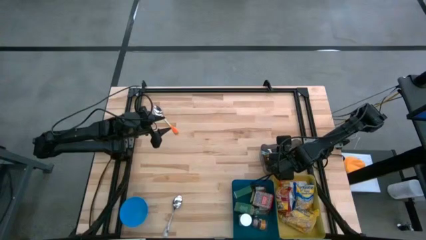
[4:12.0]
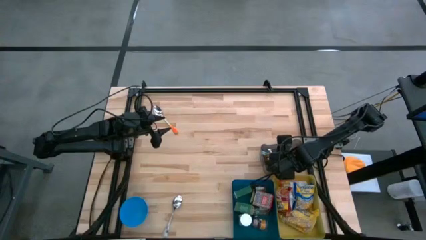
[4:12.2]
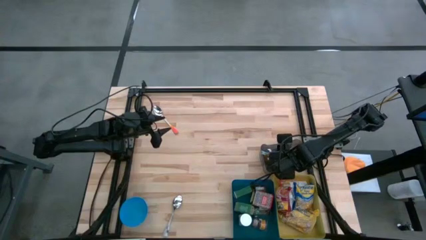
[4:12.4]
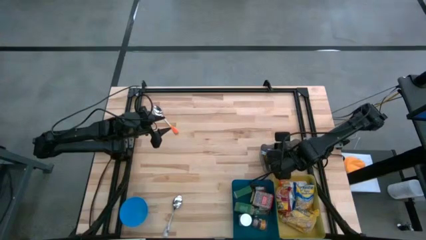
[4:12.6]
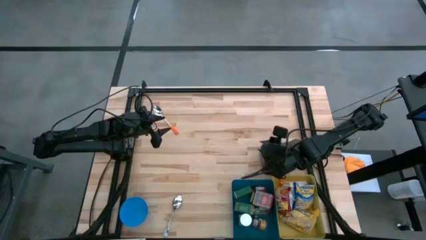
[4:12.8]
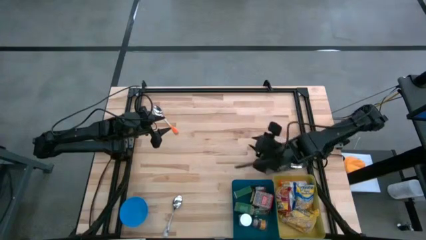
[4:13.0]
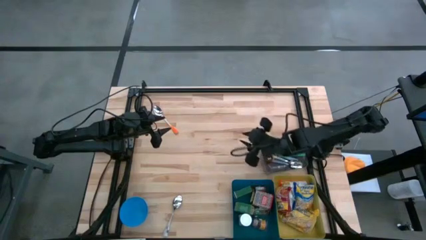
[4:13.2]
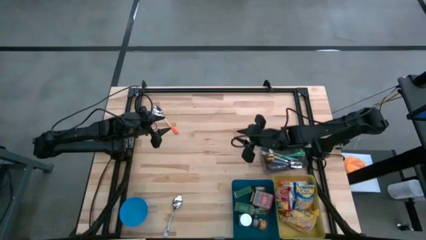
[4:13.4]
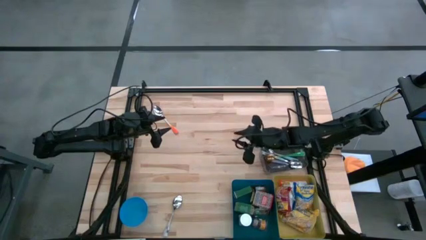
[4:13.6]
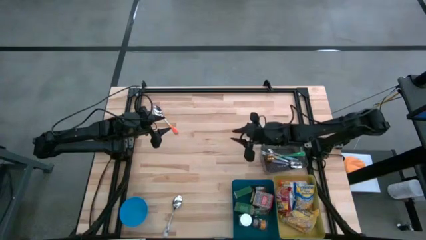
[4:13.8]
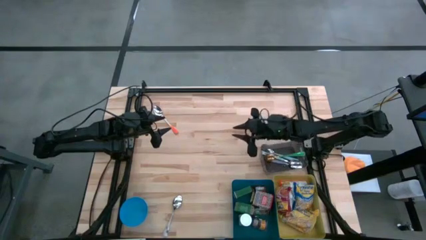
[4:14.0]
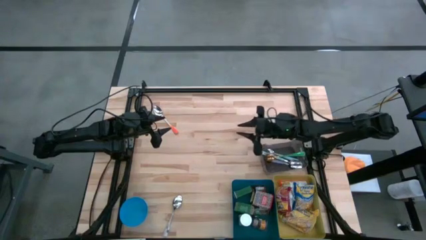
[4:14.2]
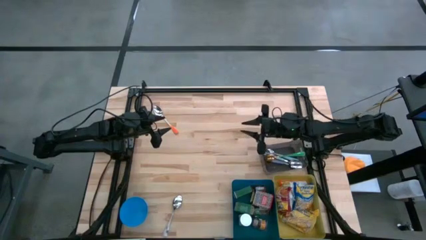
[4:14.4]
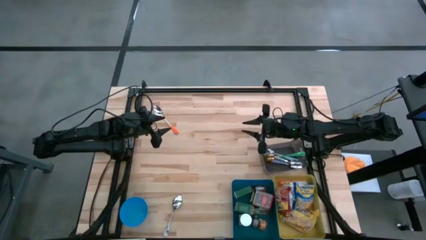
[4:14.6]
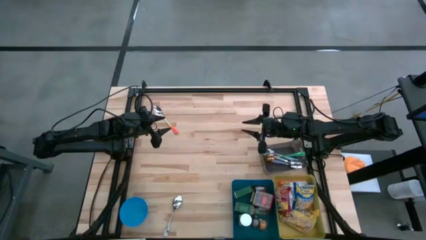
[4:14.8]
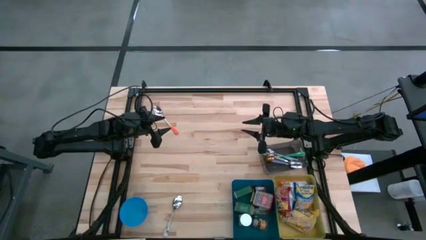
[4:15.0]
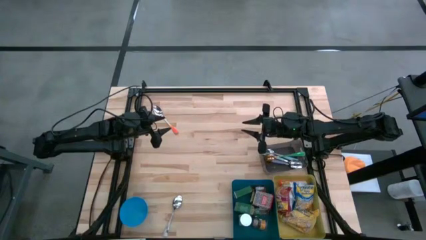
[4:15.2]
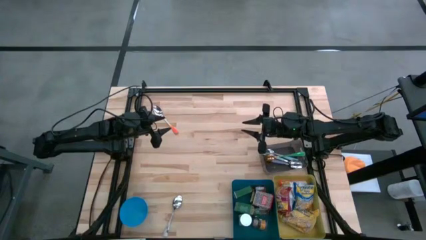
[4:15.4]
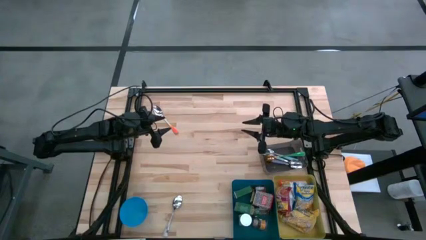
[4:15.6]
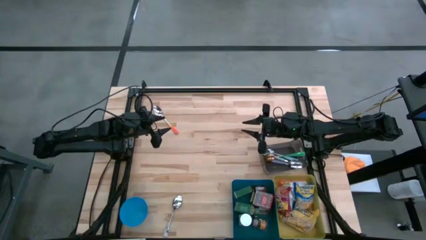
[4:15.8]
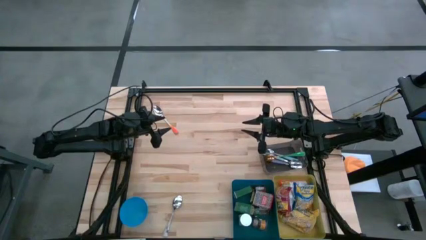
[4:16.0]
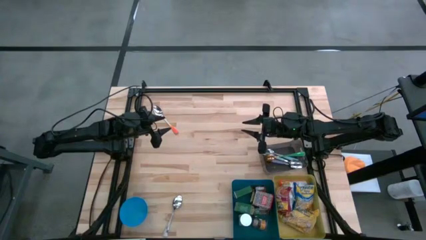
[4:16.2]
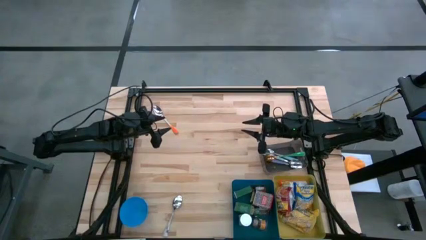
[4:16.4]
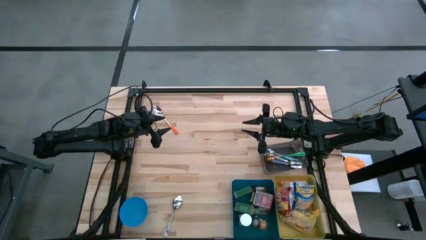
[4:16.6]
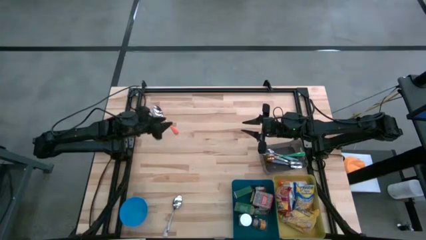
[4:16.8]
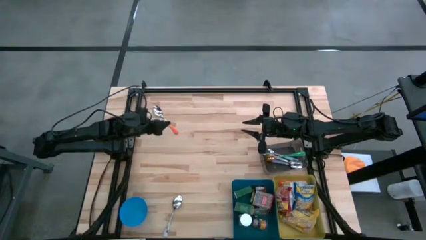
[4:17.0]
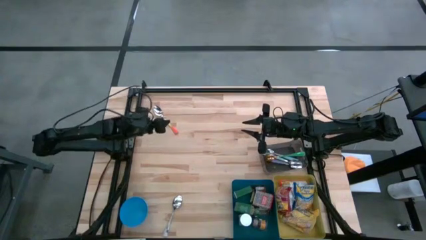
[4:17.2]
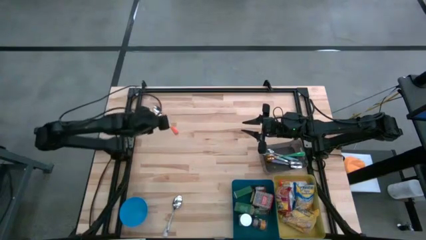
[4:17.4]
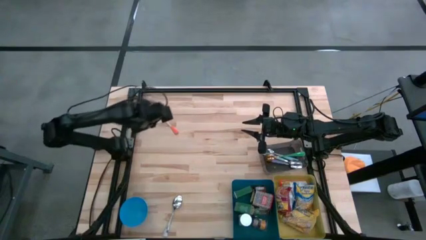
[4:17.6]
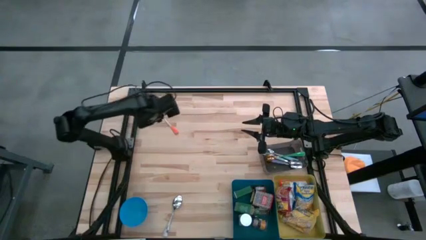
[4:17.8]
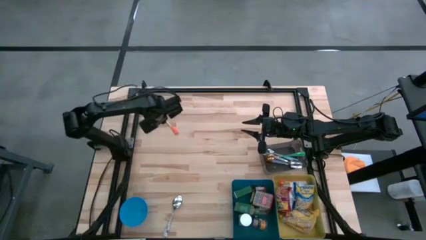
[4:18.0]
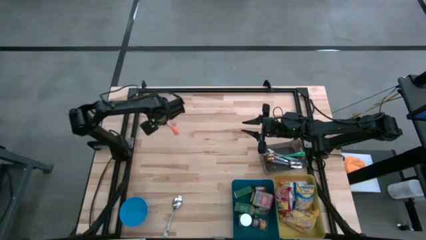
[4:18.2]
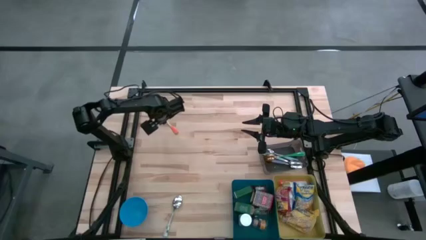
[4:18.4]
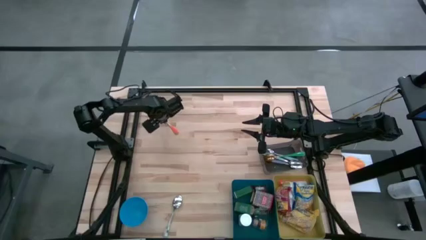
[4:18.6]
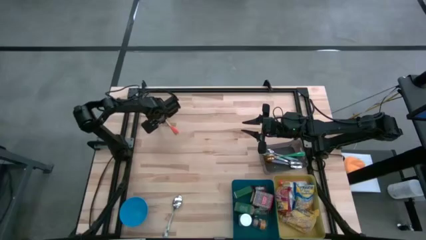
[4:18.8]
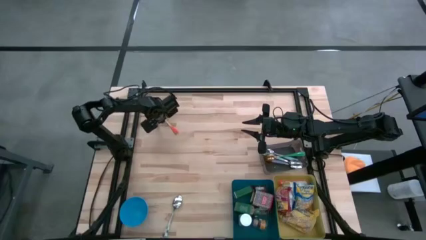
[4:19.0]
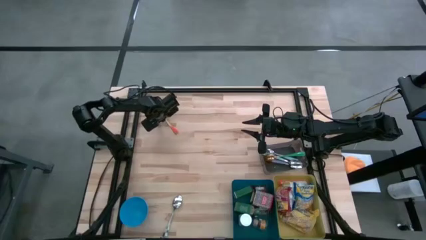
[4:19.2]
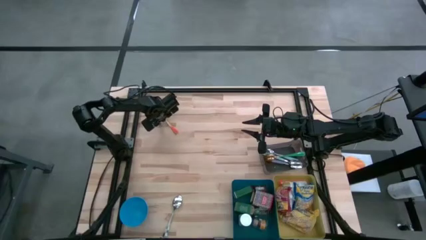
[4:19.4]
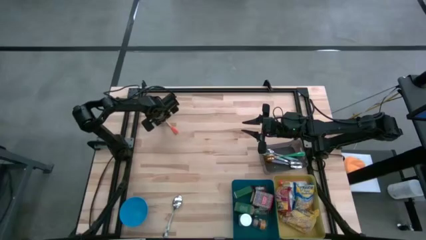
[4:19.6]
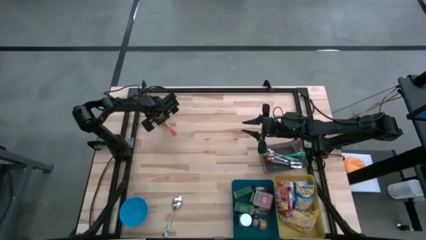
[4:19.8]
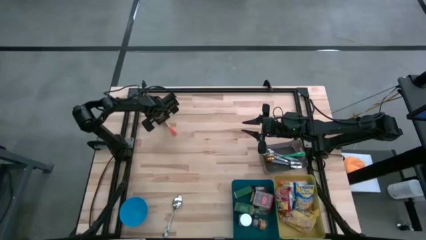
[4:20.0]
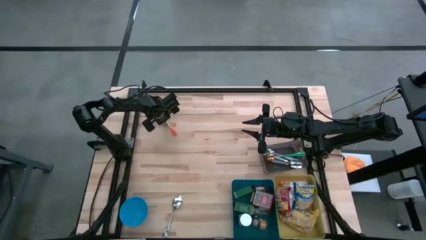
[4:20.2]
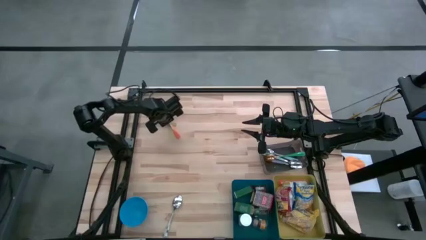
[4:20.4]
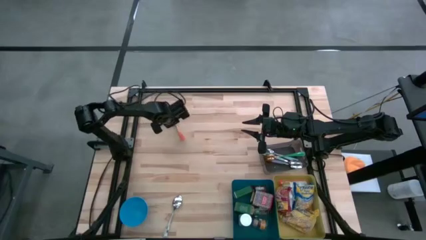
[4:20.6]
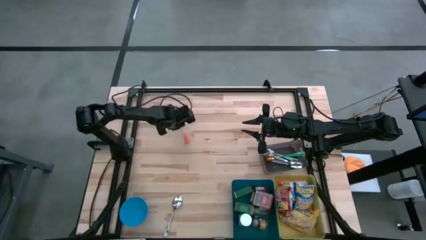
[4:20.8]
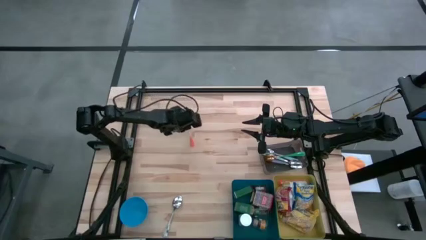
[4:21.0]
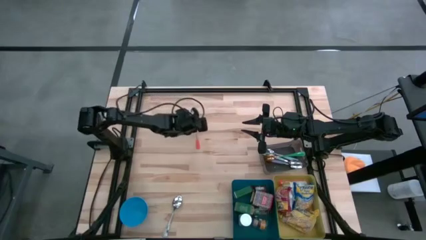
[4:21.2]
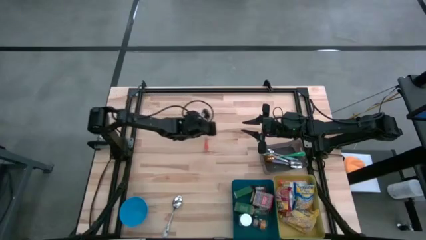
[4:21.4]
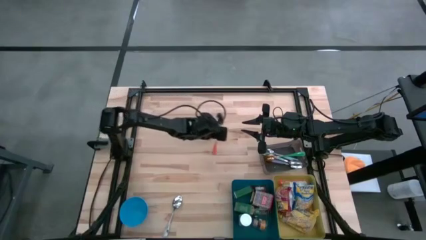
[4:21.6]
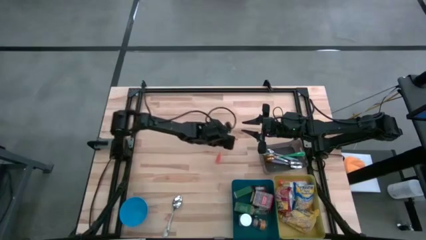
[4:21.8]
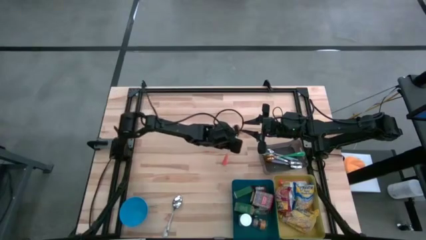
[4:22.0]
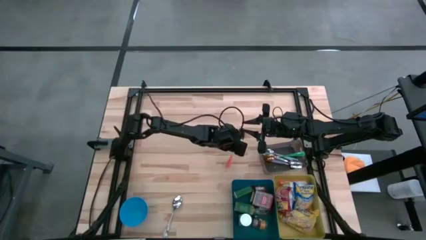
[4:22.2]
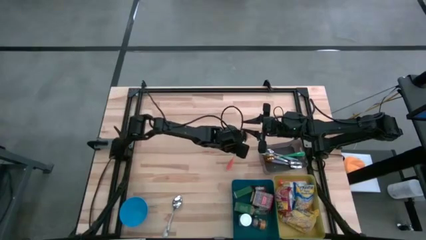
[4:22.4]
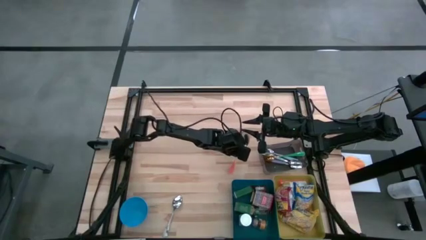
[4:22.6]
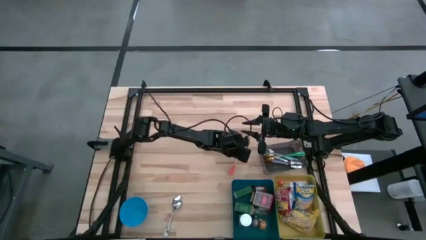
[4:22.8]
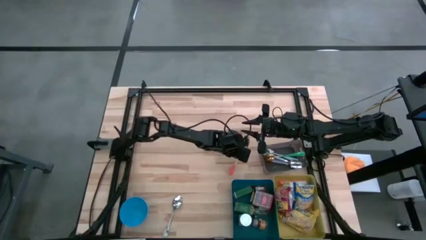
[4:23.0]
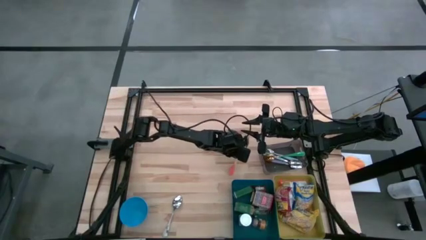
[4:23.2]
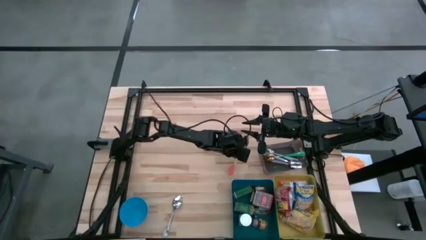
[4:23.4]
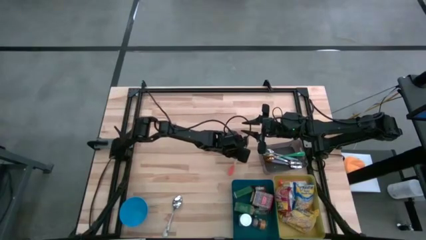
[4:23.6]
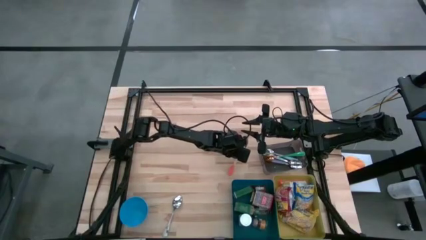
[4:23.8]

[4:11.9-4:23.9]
Put the orange spoon into the black bin
